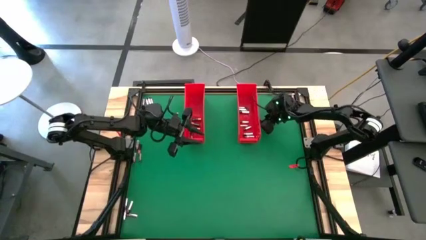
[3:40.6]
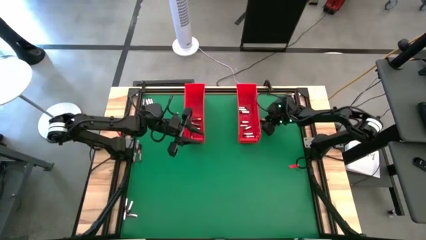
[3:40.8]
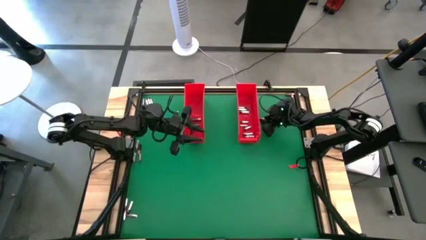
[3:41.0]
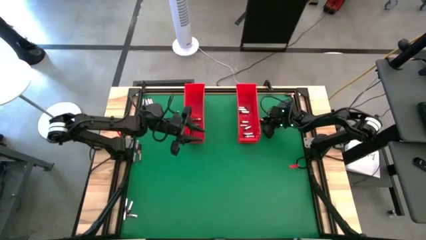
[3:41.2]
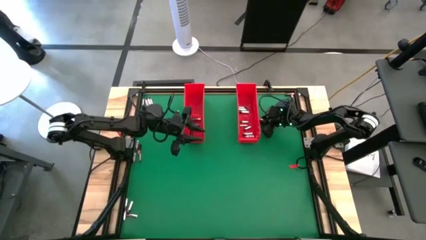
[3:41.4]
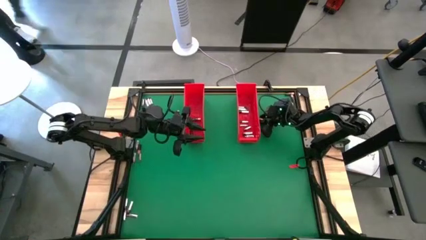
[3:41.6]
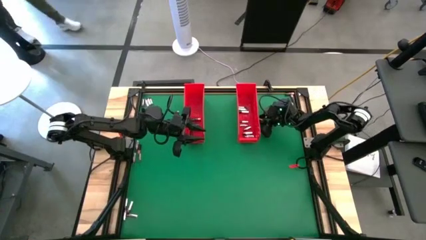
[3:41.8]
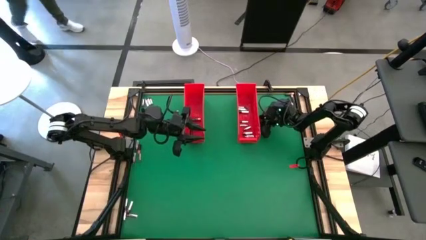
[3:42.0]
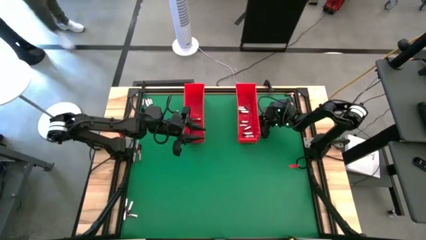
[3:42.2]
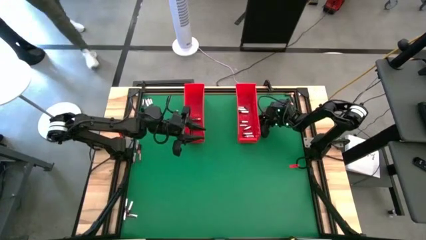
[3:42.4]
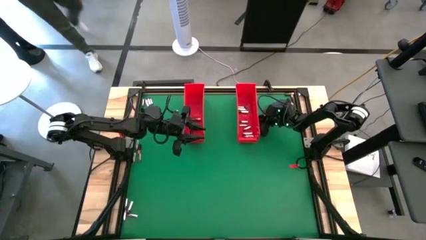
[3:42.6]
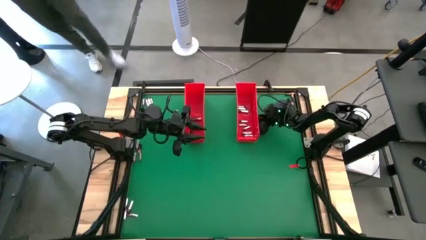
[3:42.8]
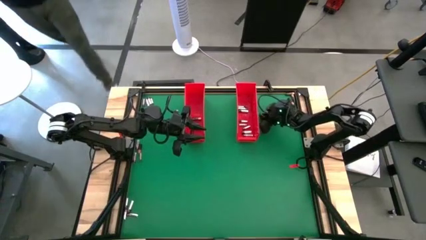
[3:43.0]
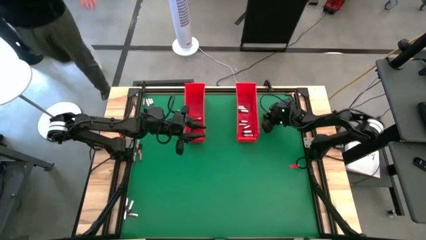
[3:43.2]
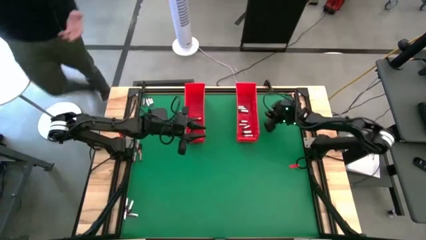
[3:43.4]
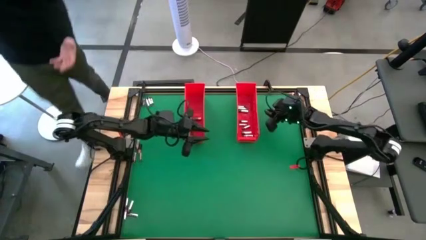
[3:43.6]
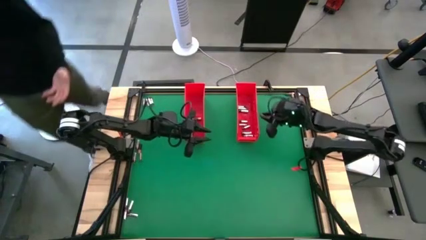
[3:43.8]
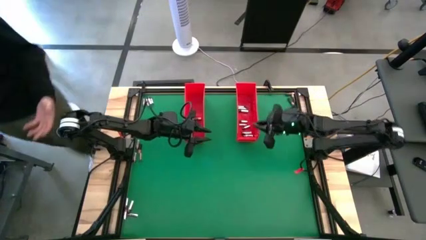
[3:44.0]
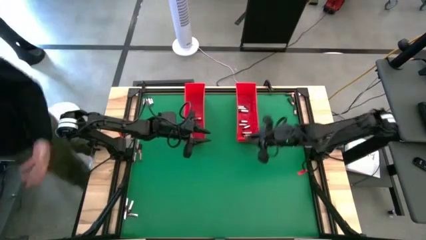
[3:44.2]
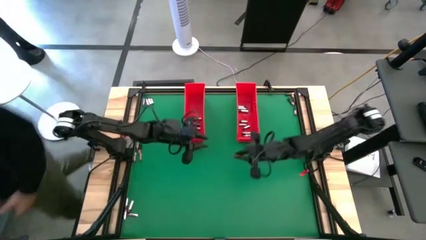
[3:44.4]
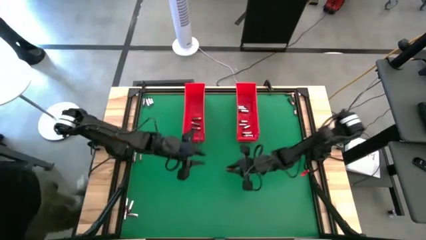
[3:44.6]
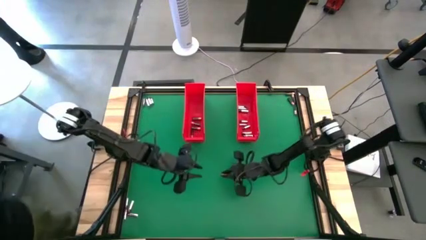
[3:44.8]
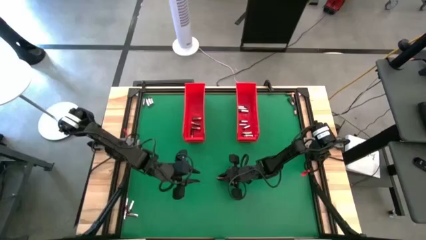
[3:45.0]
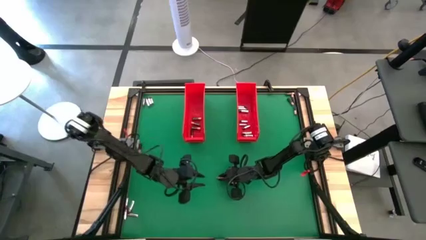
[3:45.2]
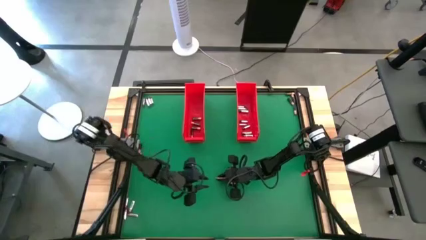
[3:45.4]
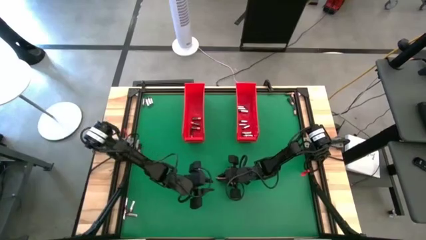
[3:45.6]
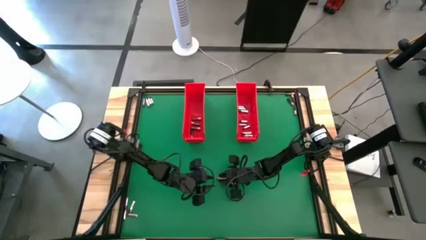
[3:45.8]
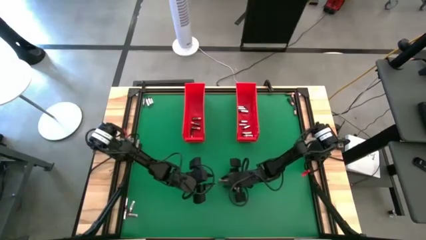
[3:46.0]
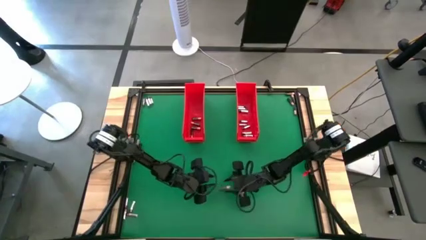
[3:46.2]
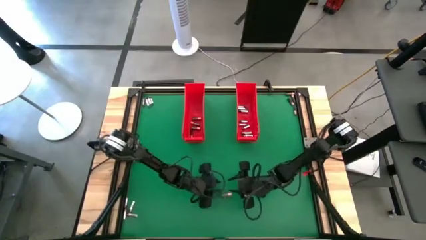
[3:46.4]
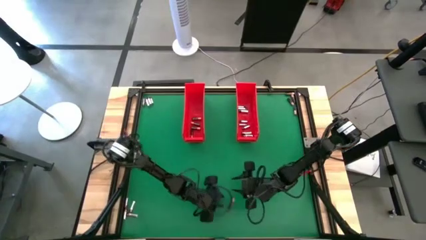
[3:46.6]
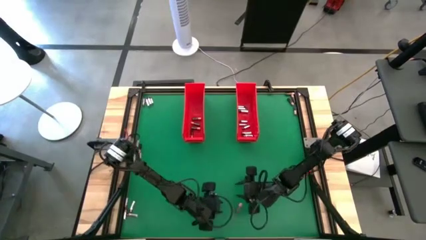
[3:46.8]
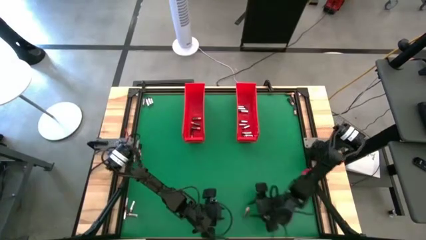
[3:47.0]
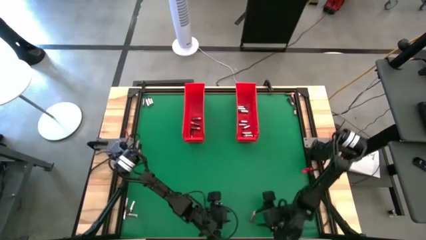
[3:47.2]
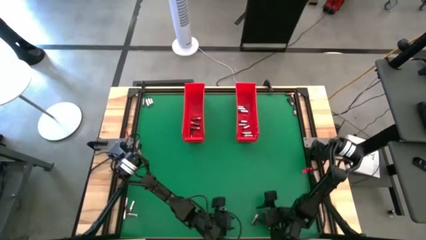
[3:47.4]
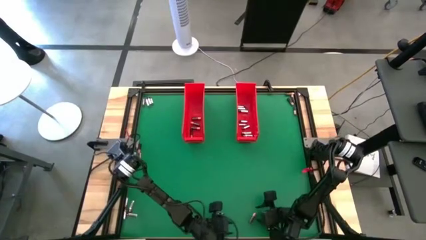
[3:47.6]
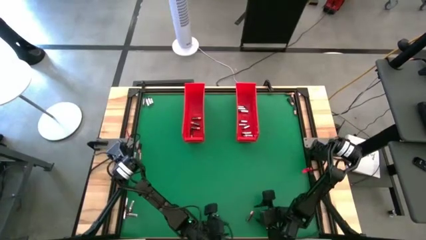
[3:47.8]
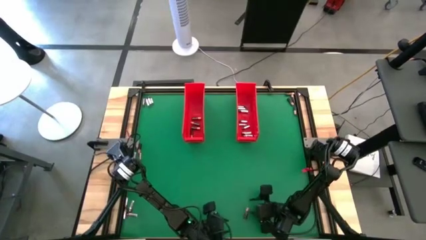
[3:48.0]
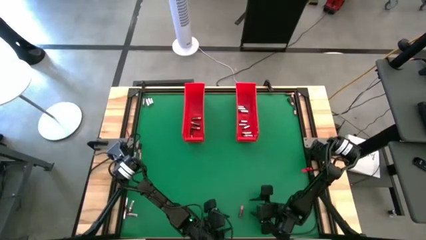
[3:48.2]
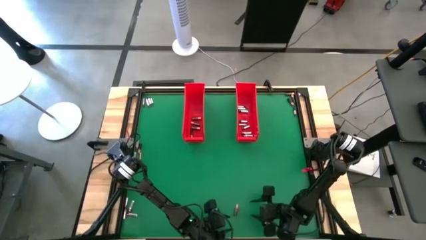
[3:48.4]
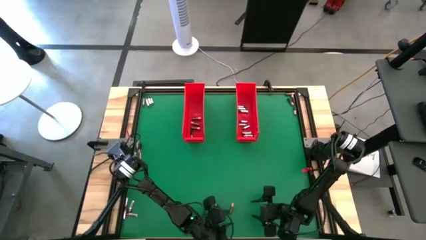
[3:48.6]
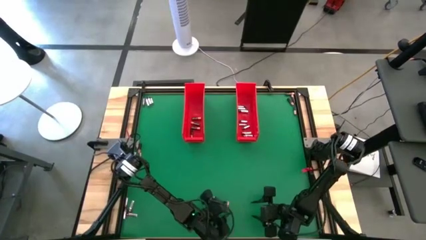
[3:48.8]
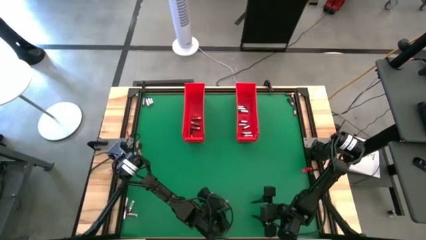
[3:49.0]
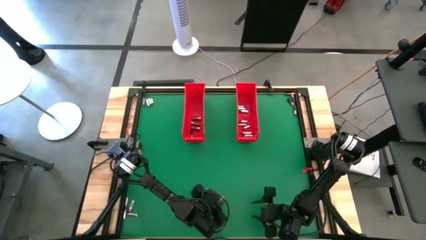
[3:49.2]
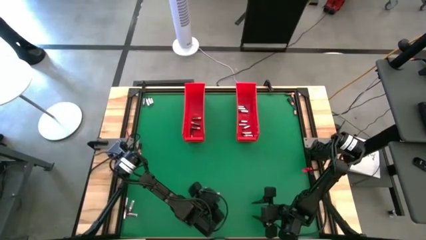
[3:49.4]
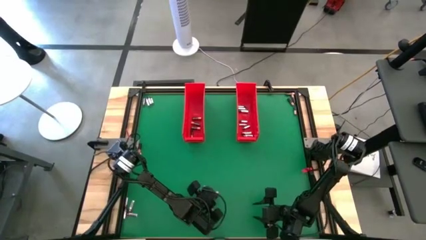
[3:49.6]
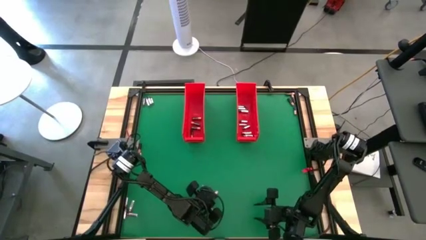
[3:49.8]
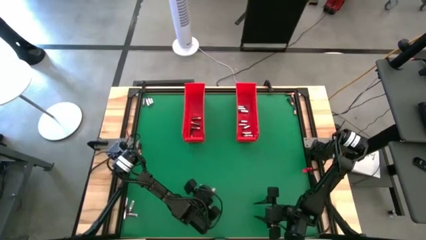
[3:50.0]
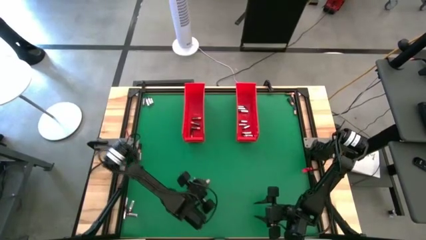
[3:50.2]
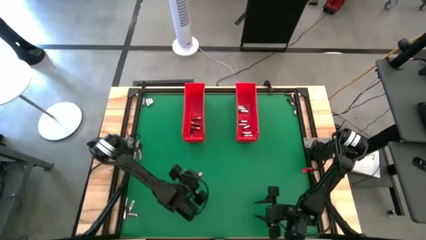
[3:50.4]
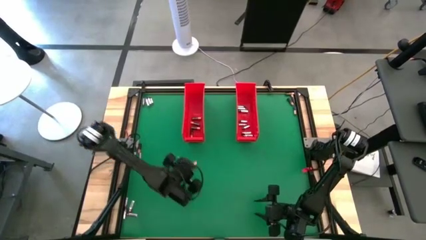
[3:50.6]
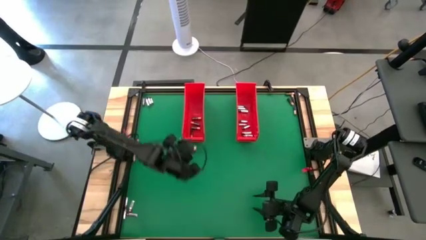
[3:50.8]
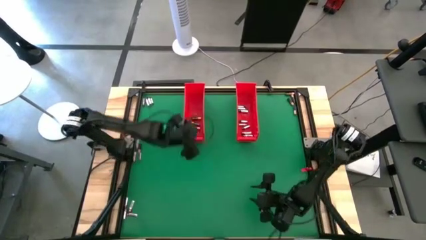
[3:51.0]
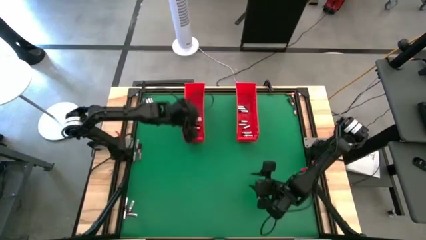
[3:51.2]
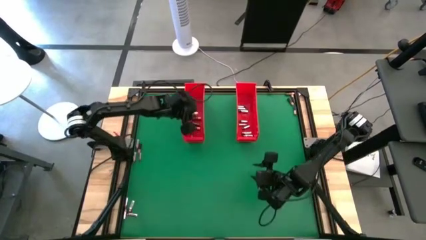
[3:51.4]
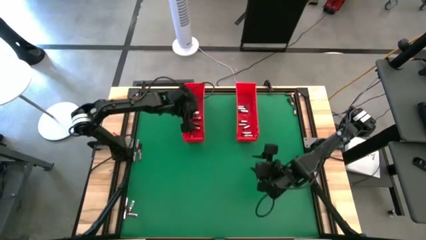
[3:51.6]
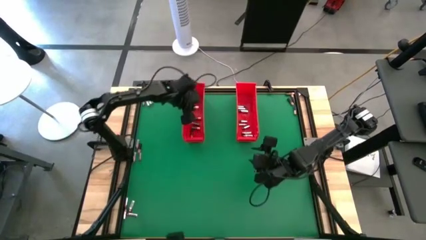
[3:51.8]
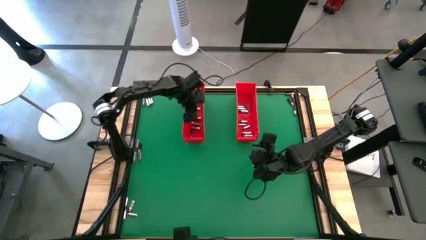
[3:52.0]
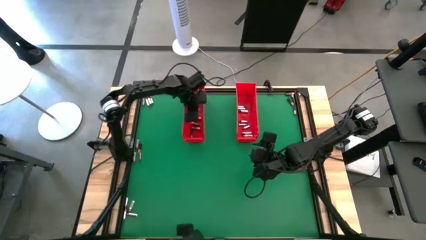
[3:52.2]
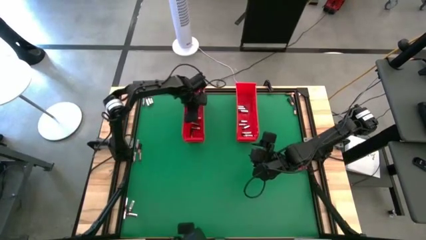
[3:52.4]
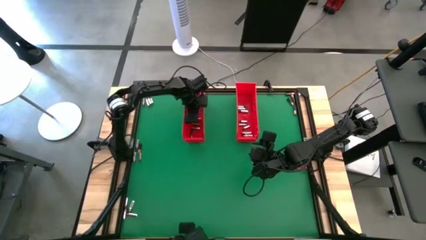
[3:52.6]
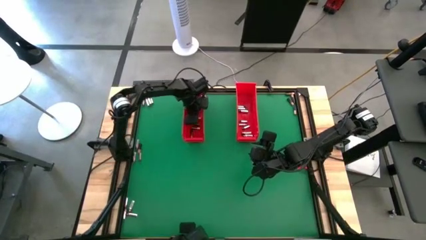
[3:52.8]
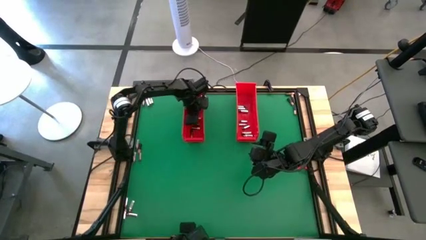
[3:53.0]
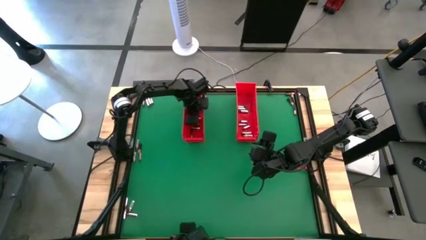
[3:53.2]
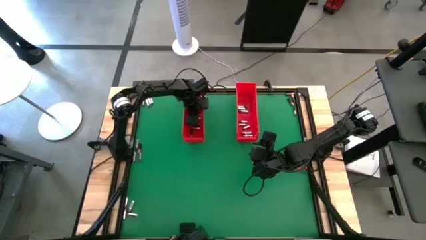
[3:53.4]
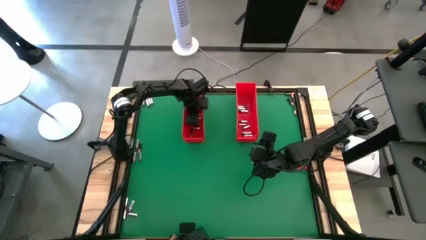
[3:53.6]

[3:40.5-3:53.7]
Task: Sort batteries
Put the brown battery into the left red bin

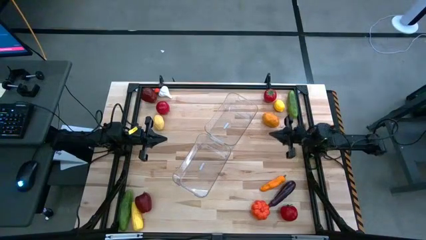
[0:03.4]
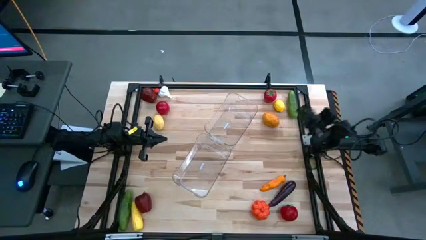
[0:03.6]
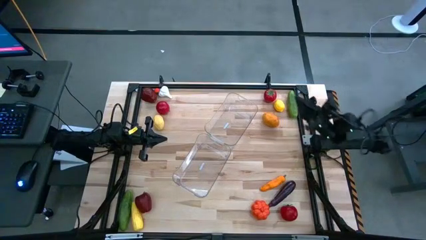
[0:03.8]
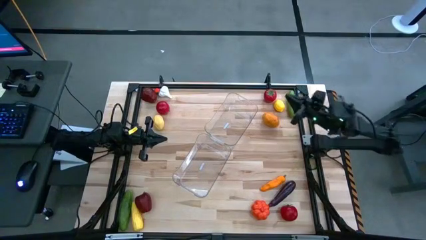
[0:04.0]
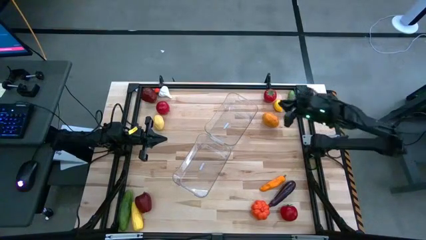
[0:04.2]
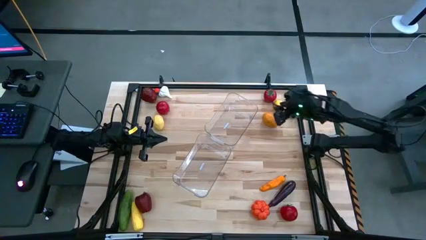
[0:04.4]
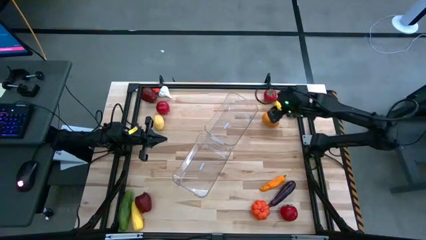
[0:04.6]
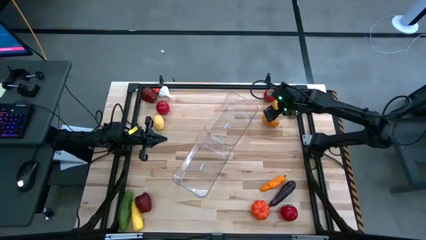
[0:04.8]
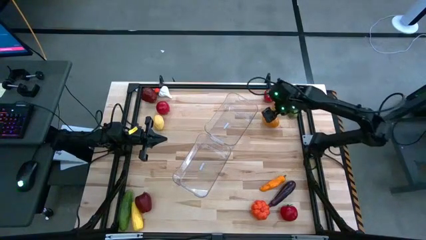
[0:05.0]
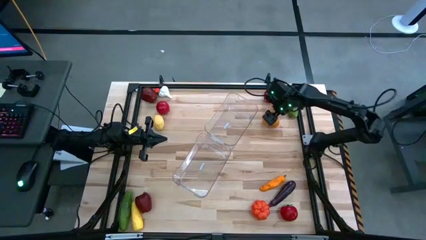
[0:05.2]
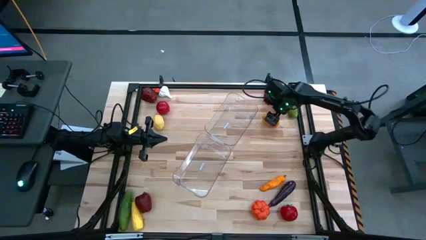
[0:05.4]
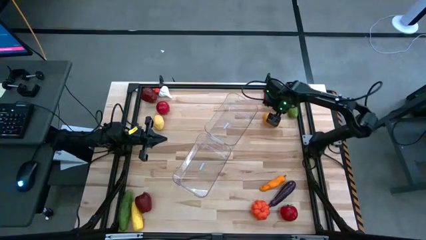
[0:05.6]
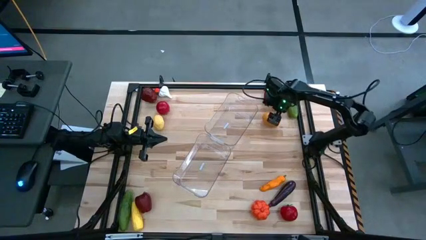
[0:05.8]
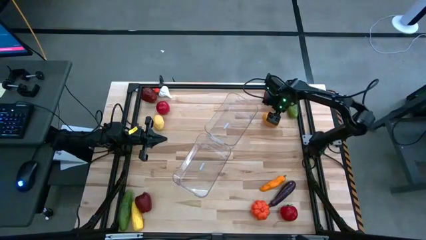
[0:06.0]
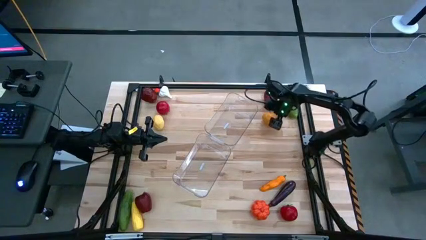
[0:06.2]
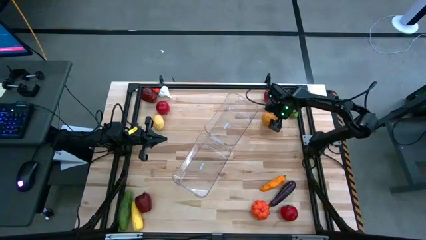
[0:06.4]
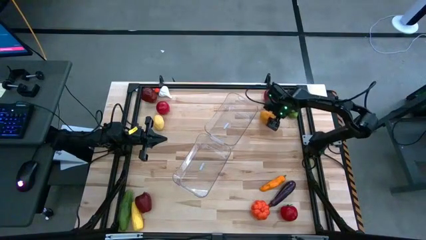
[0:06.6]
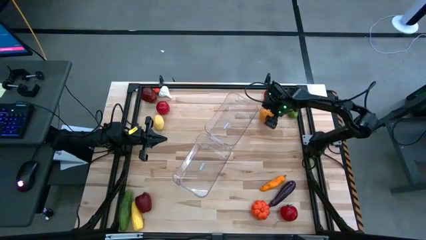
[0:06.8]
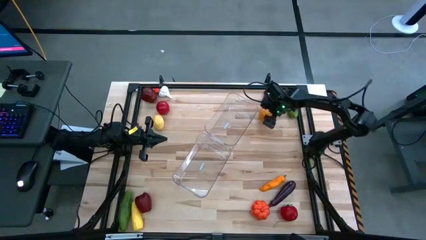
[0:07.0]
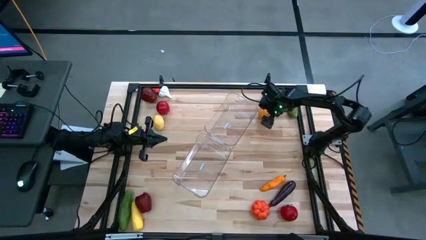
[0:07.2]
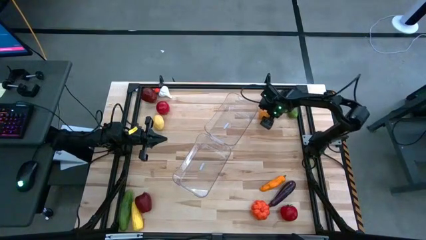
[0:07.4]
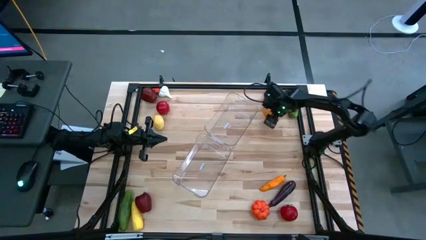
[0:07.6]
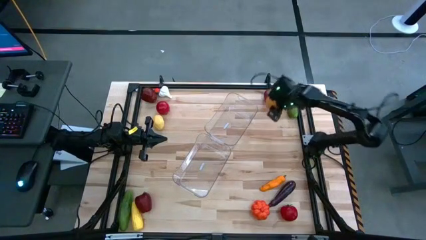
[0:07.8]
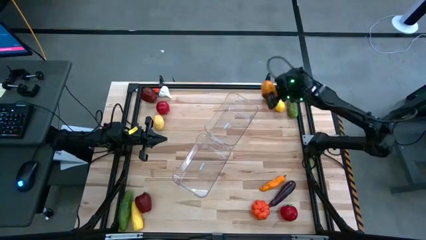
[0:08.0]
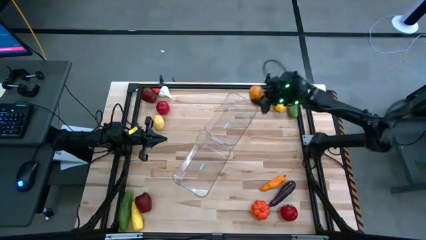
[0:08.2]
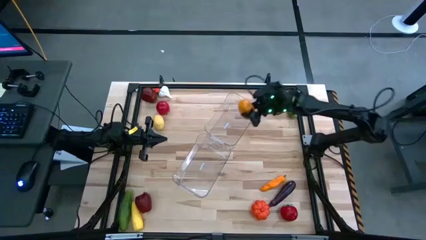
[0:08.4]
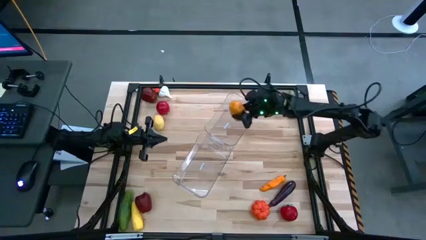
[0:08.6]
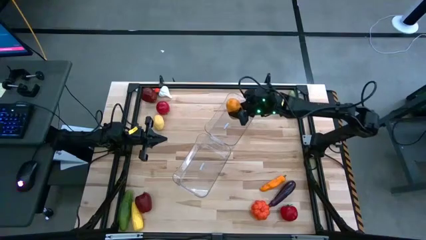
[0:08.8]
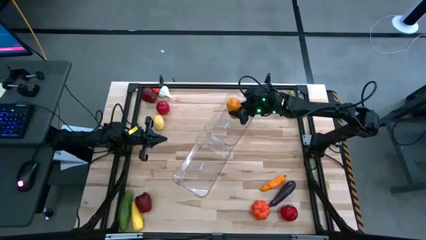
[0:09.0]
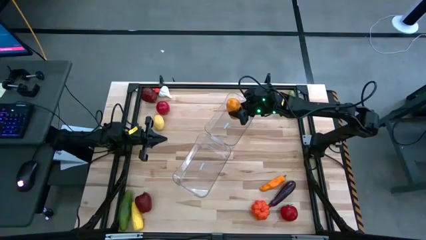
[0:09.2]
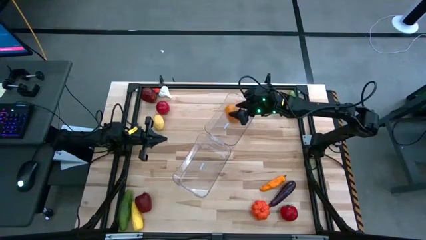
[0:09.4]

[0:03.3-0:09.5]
Task: Sort produce into baskets
Put the brown potato into the top transparent bin
